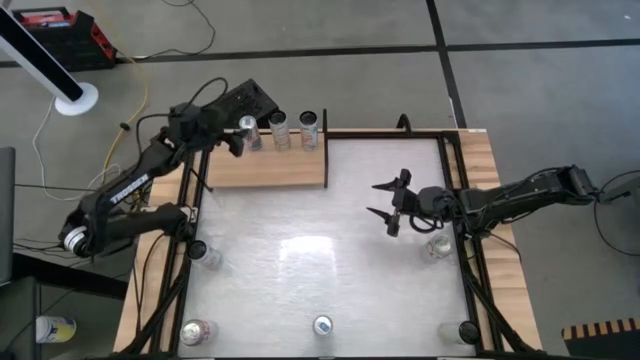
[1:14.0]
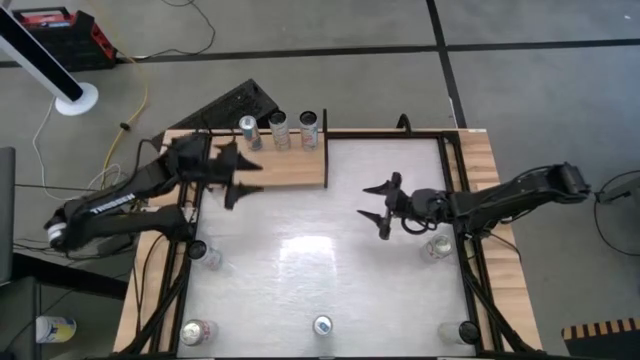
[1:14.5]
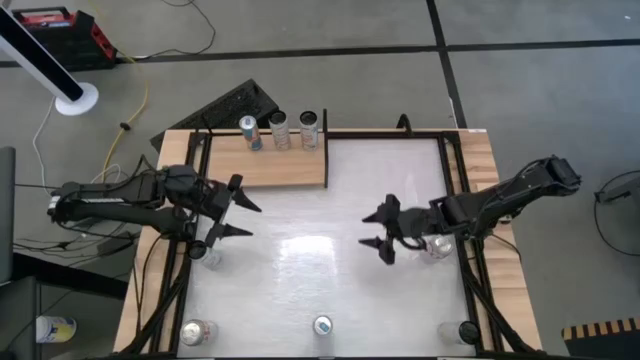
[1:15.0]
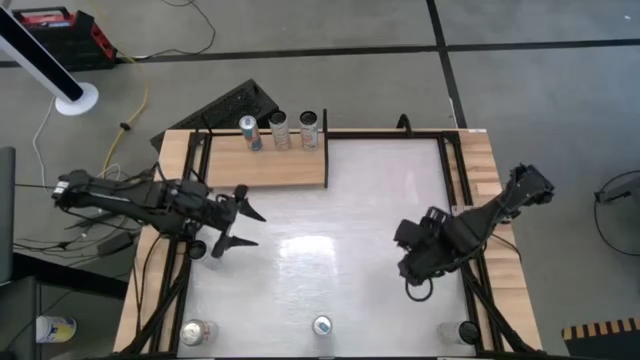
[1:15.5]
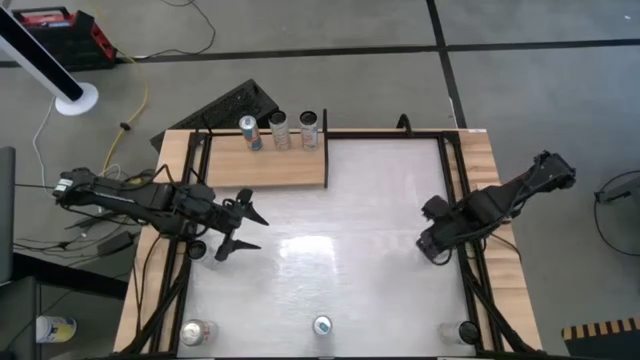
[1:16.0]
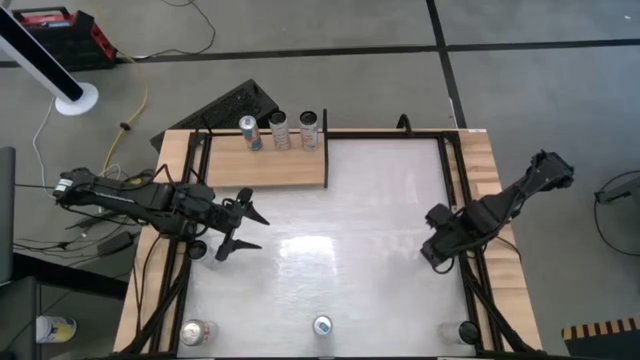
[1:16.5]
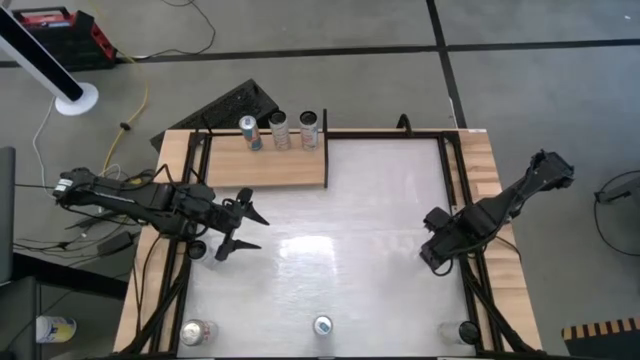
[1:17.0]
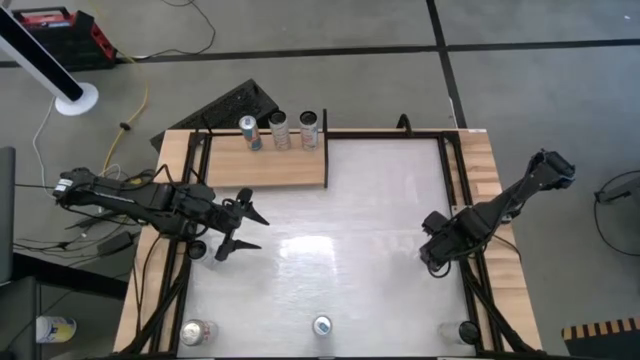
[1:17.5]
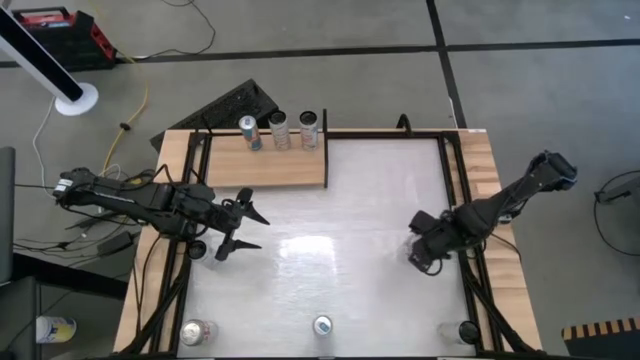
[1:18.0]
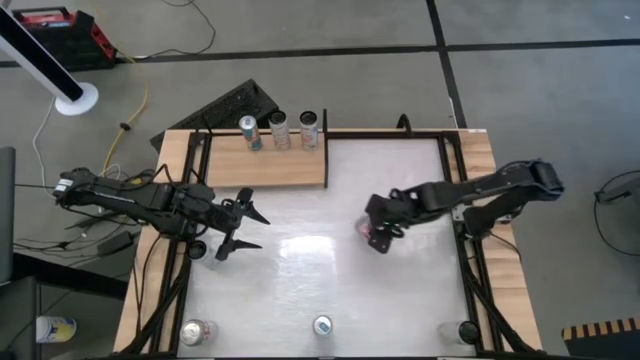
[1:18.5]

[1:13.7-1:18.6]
Task: Place canned beverage on shelf
Put the top coke soda can beside the red bull soda can on the shelf

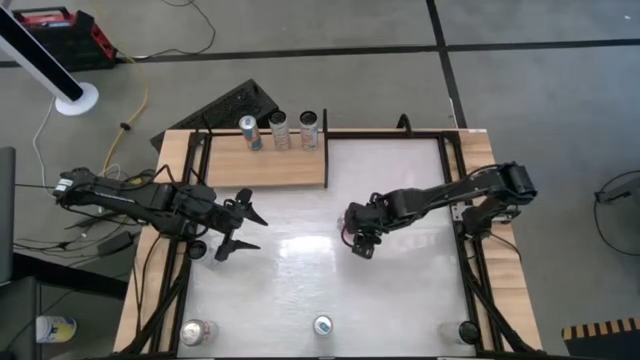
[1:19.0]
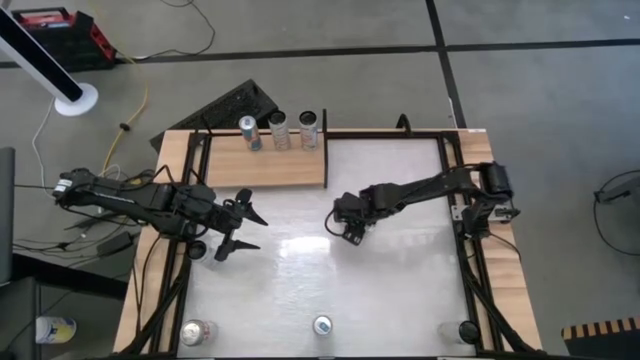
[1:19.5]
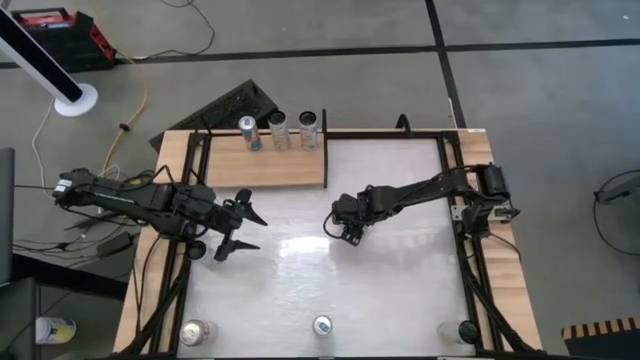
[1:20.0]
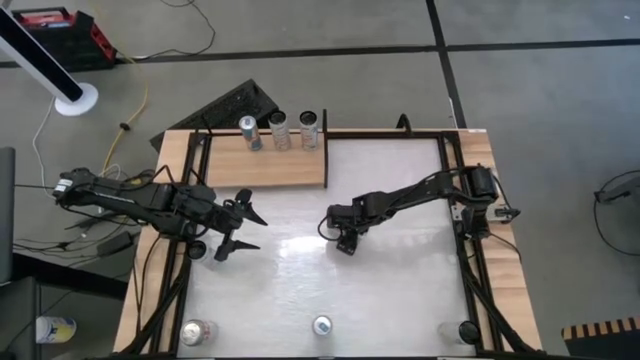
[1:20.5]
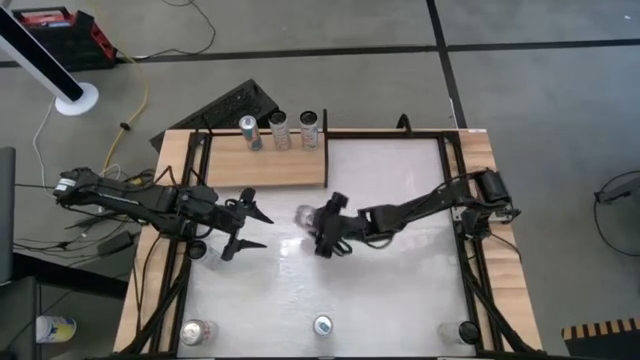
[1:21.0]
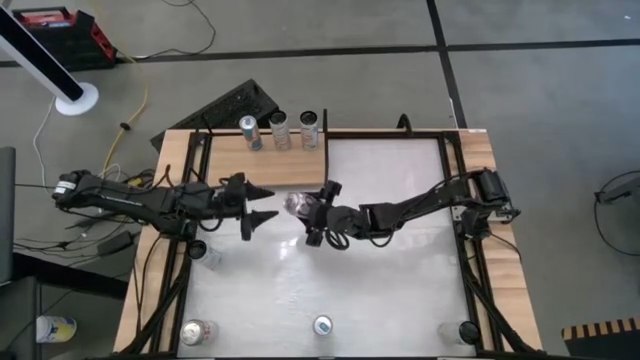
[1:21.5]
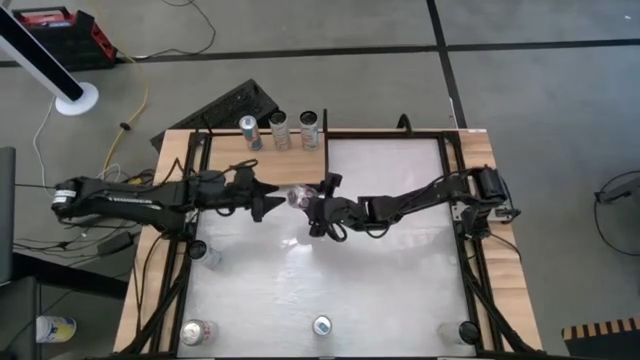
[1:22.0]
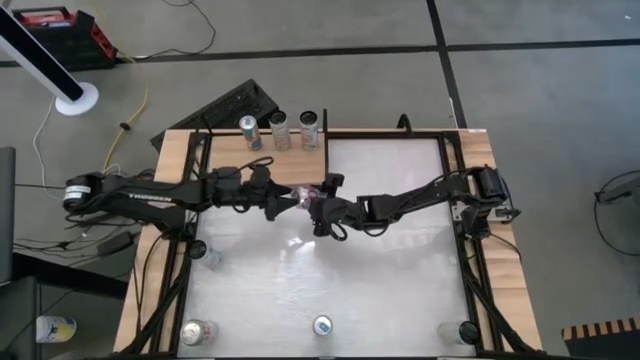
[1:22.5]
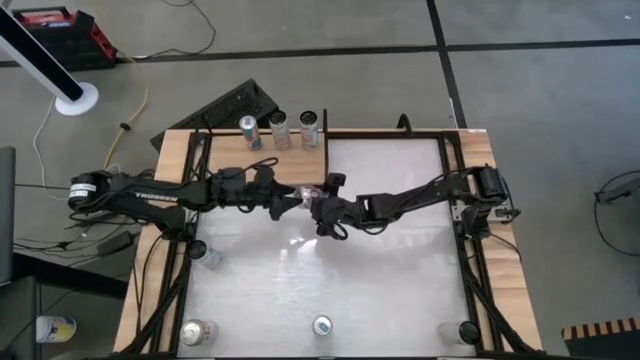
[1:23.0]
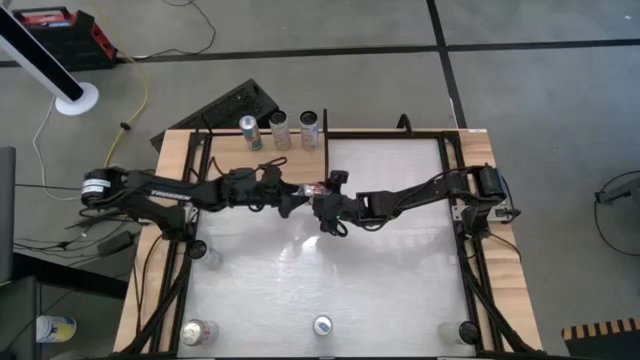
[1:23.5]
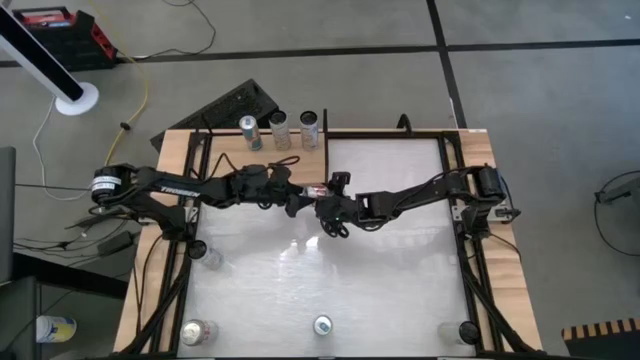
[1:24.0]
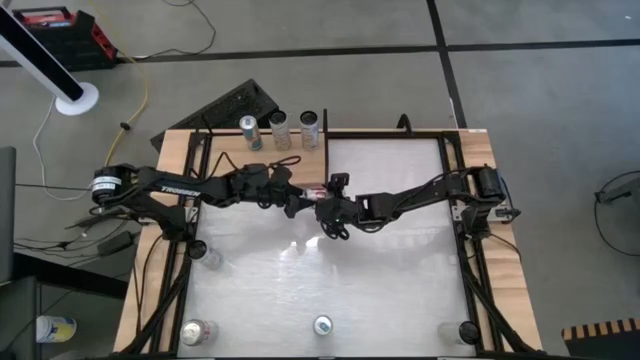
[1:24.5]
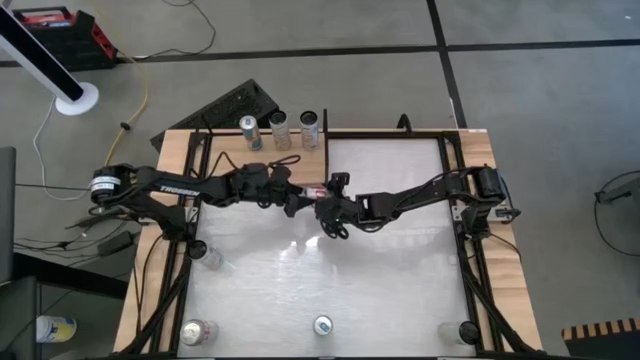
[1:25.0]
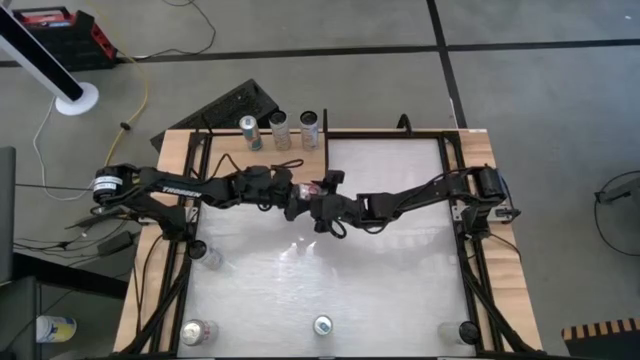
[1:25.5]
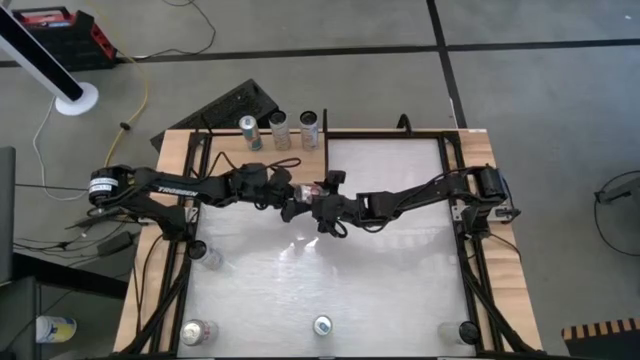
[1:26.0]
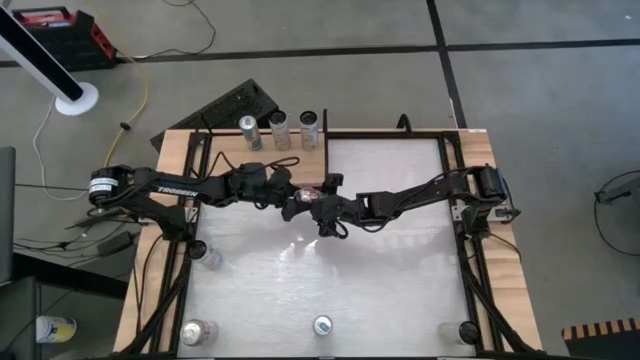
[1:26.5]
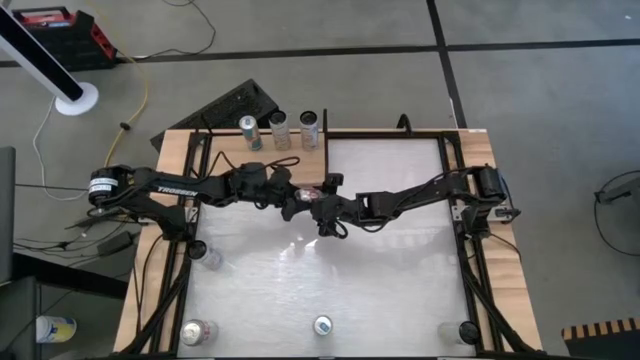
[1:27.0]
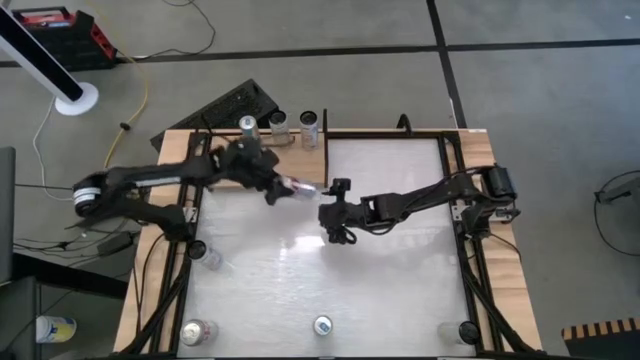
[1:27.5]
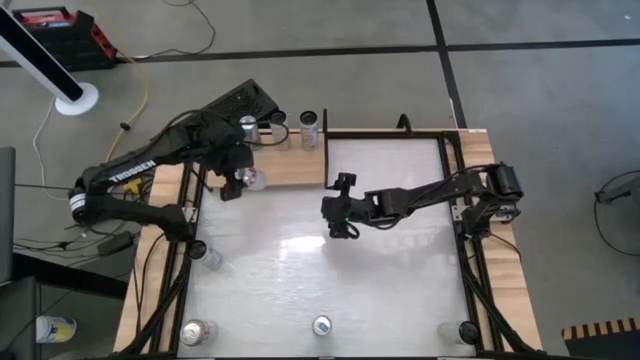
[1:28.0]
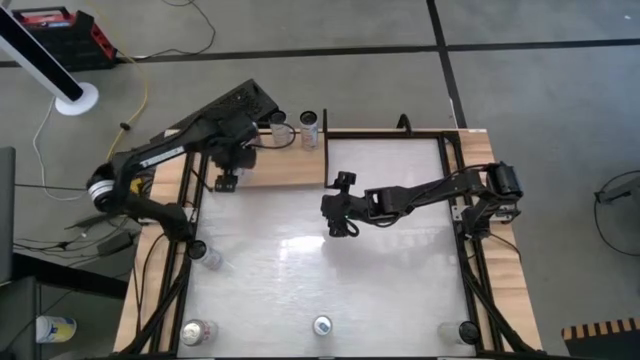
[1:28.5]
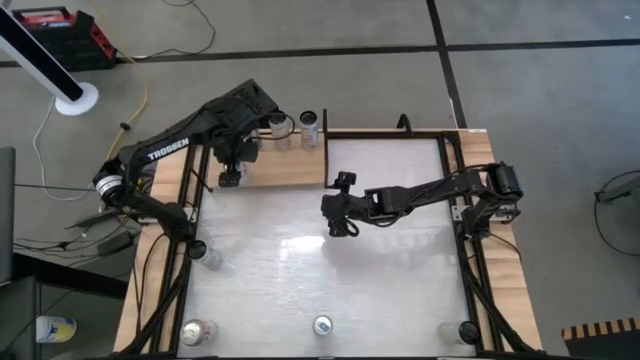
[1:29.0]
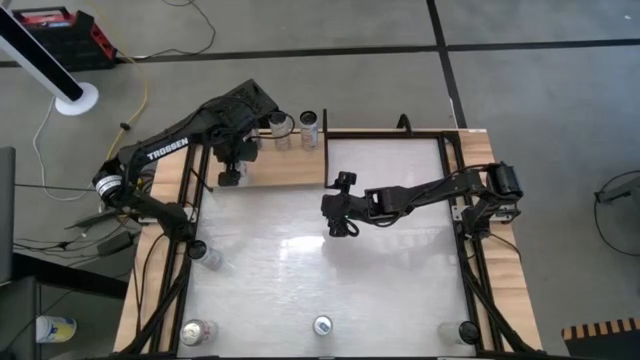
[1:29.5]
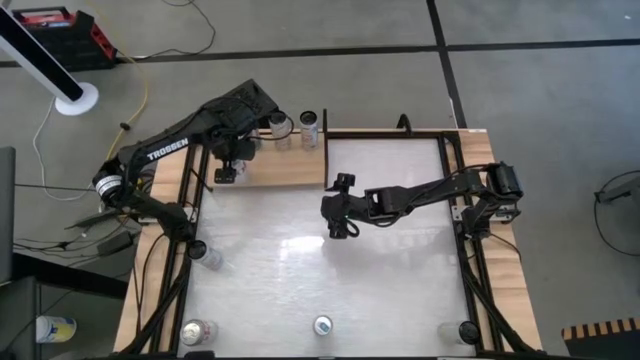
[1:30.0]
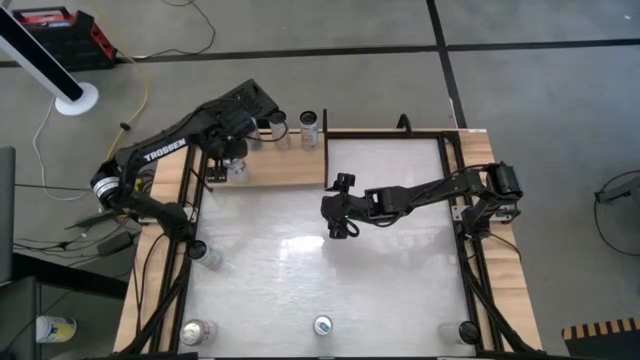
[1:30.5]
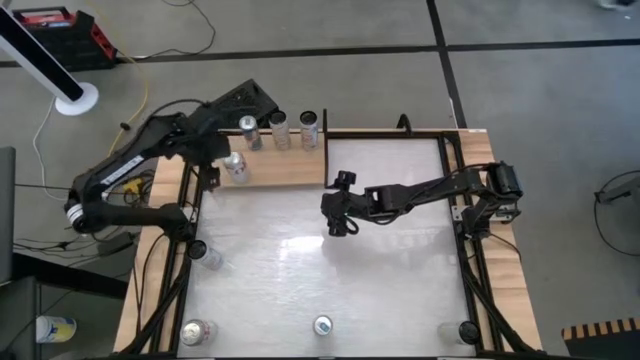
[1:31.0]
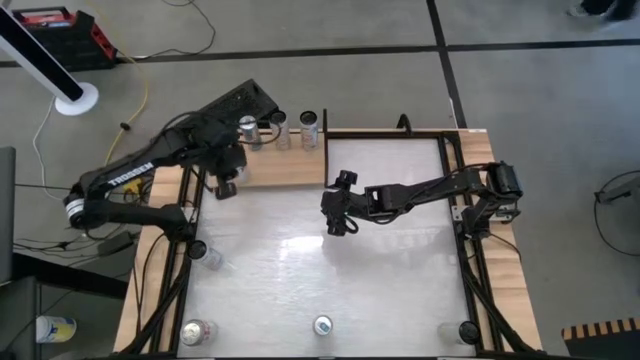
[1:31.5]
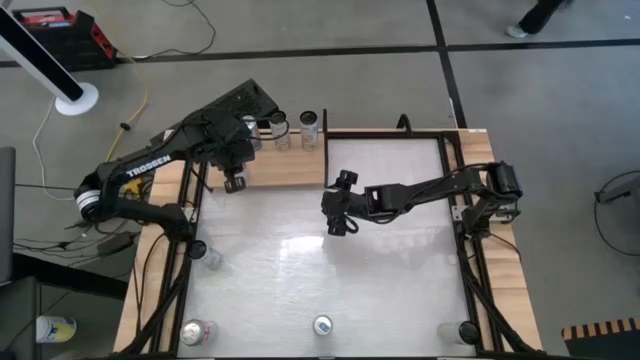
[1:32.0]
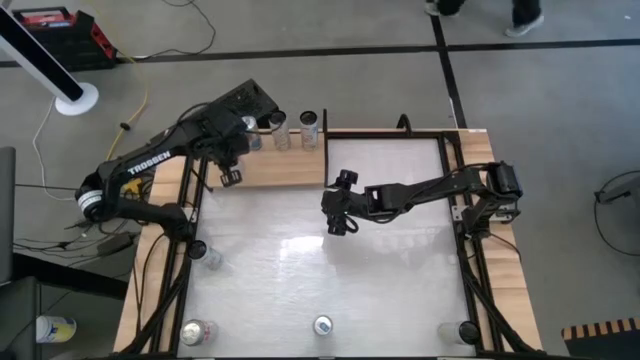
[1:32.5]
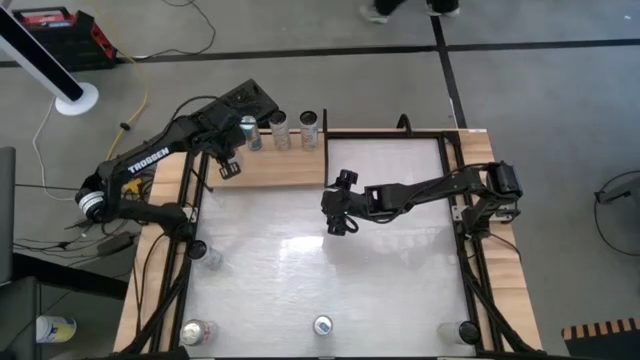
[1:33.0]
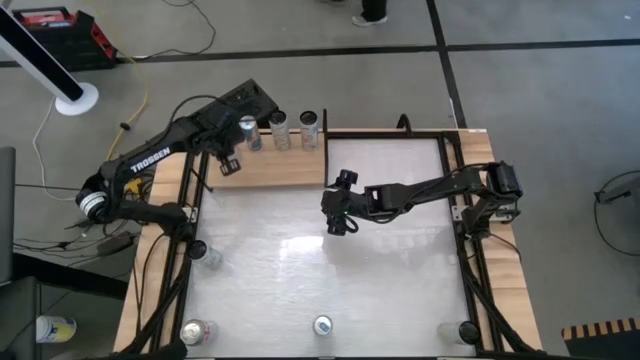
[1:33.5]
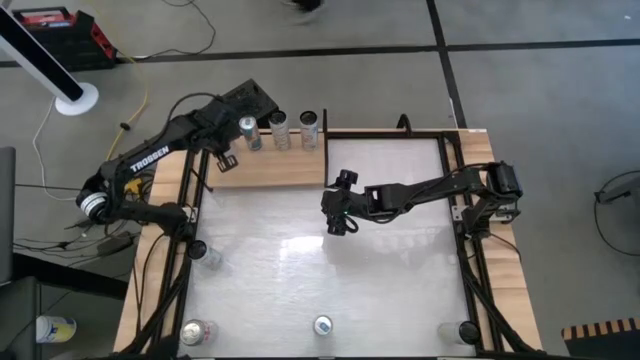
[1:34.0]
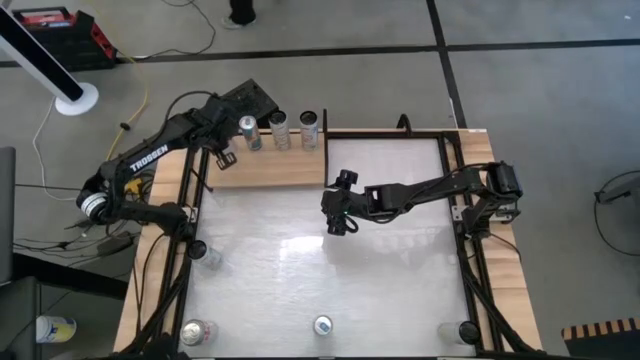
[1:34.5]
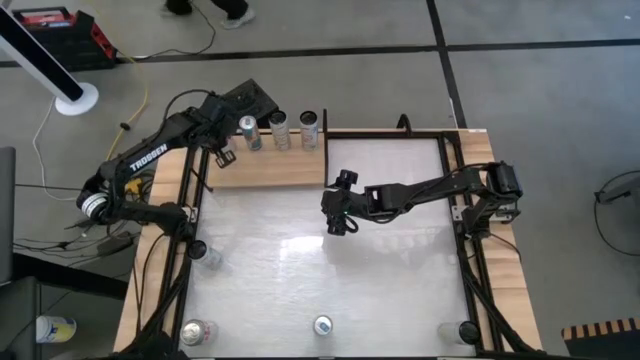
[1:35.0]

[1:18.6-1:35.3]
Put the top coke soda can beside the red bull soda can on the shelf
